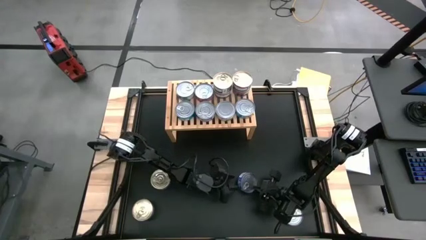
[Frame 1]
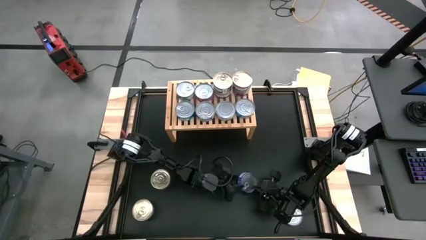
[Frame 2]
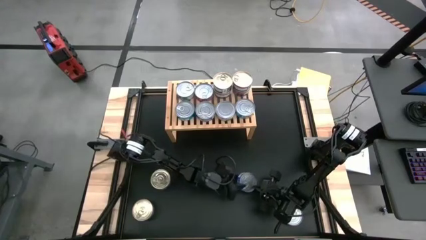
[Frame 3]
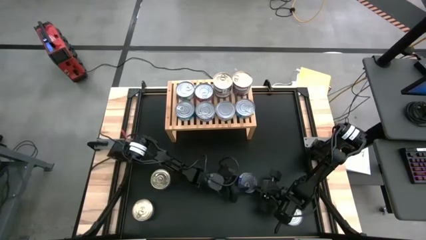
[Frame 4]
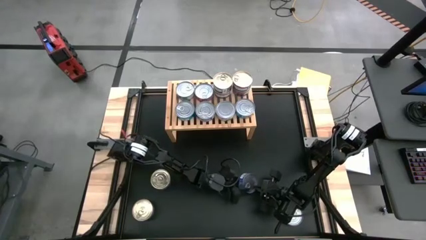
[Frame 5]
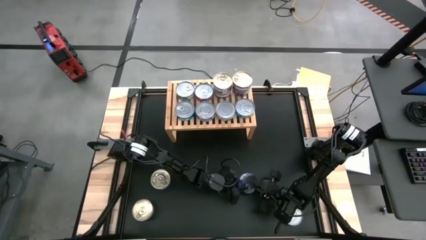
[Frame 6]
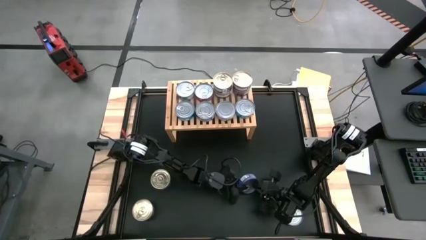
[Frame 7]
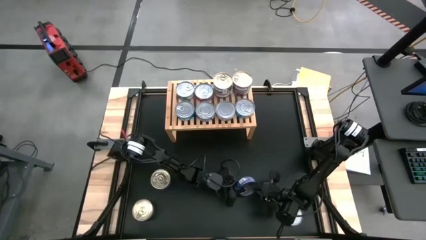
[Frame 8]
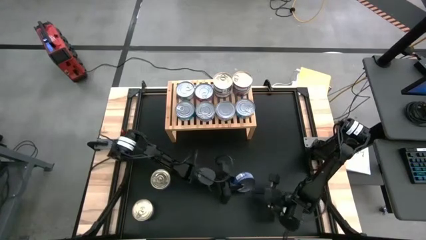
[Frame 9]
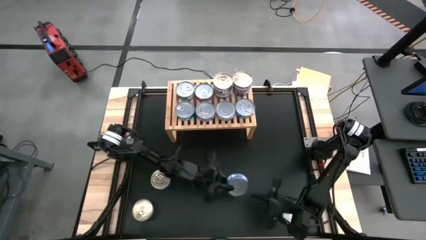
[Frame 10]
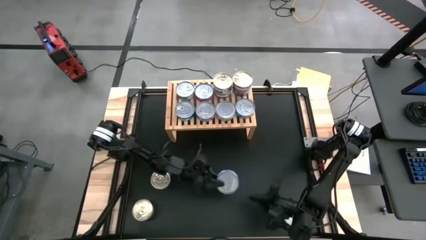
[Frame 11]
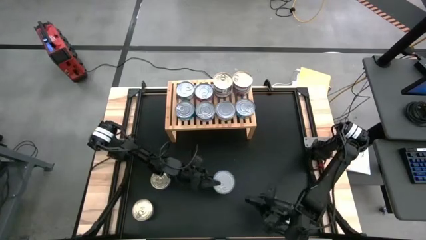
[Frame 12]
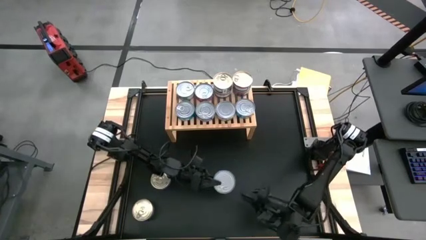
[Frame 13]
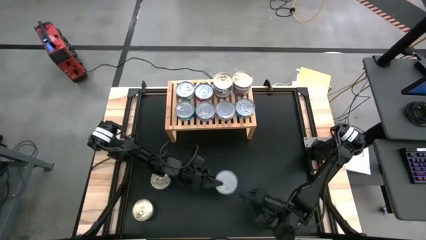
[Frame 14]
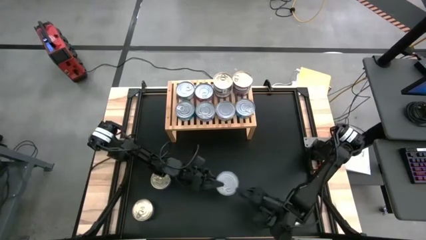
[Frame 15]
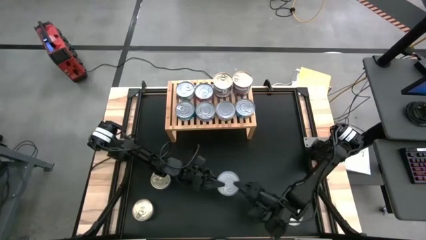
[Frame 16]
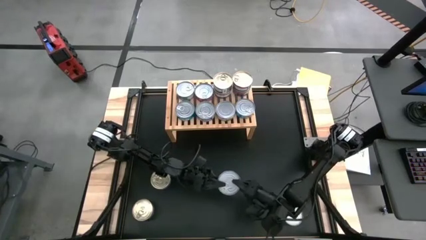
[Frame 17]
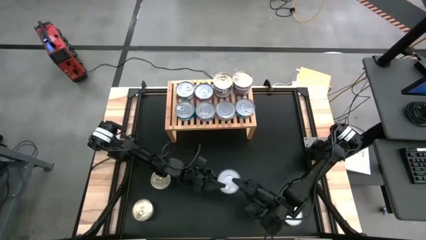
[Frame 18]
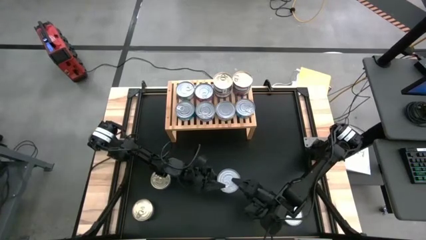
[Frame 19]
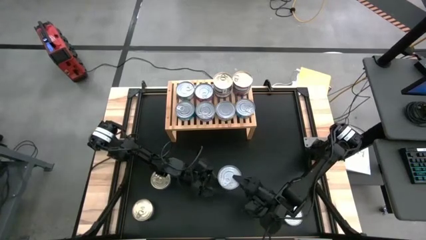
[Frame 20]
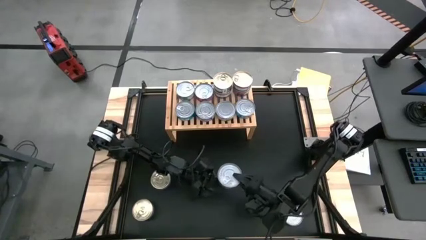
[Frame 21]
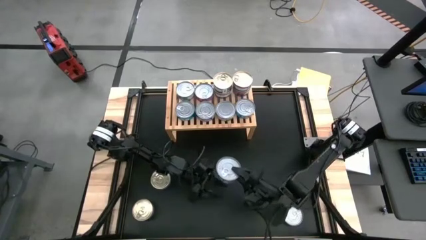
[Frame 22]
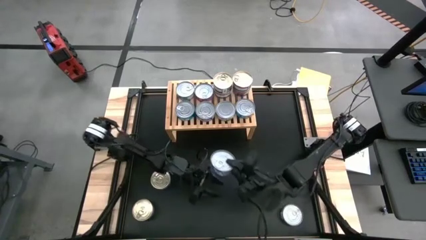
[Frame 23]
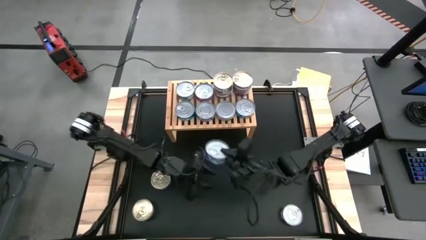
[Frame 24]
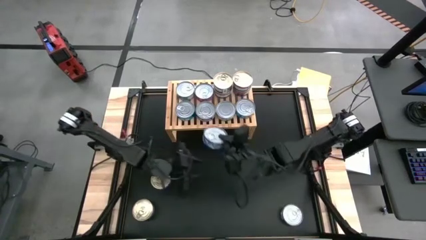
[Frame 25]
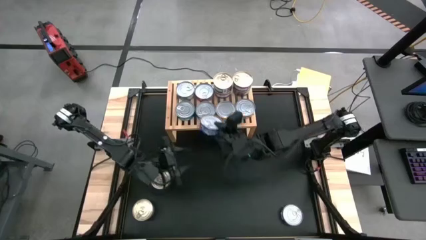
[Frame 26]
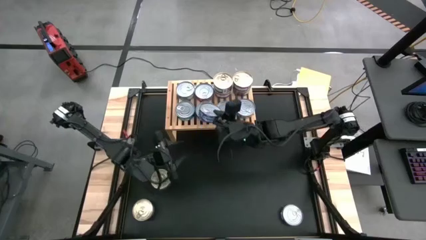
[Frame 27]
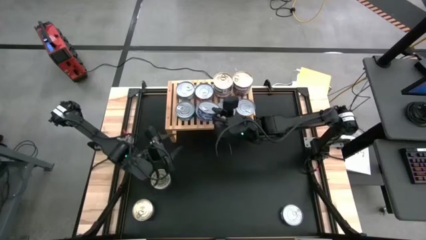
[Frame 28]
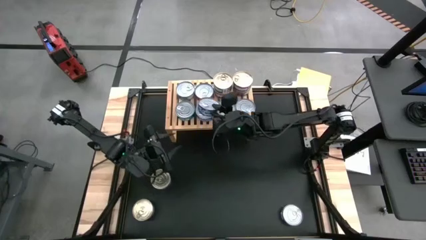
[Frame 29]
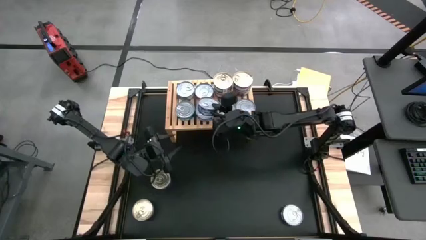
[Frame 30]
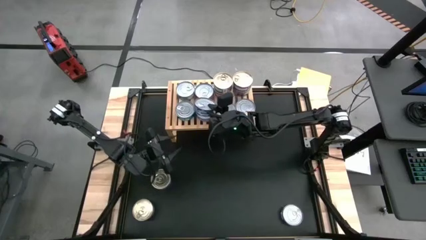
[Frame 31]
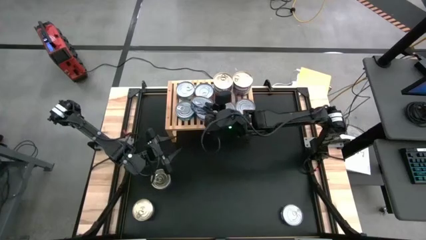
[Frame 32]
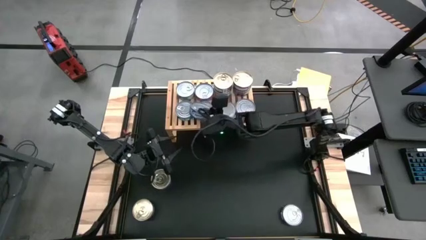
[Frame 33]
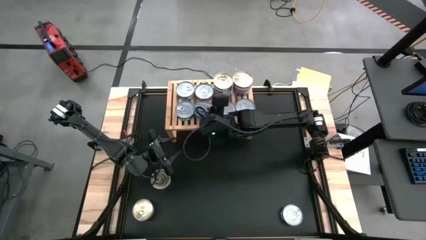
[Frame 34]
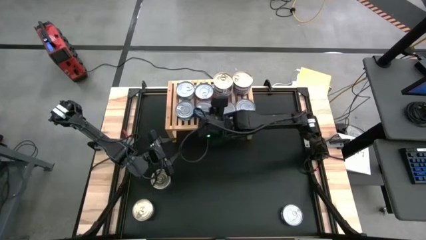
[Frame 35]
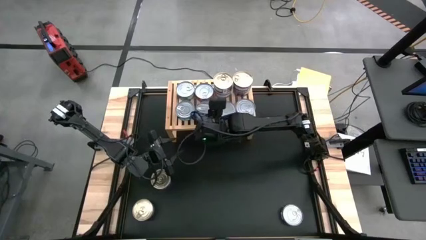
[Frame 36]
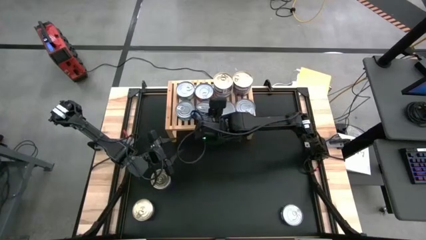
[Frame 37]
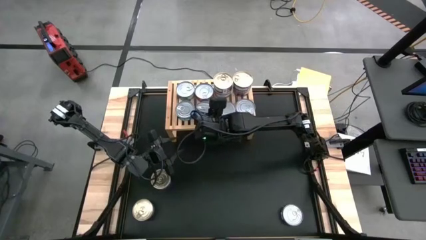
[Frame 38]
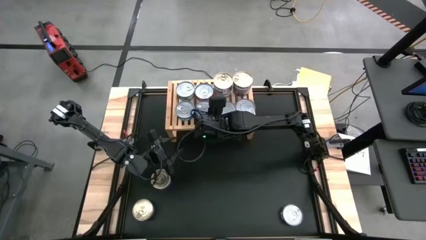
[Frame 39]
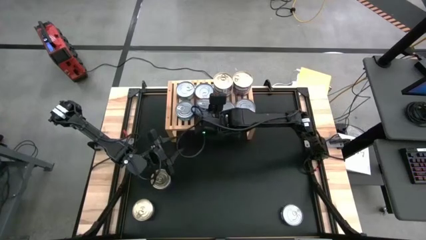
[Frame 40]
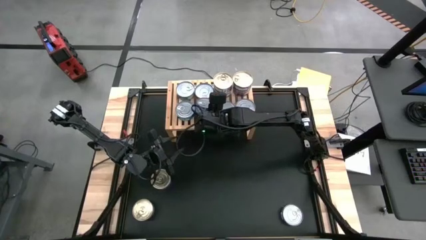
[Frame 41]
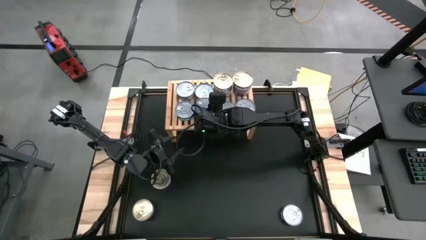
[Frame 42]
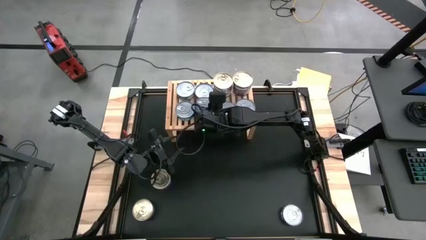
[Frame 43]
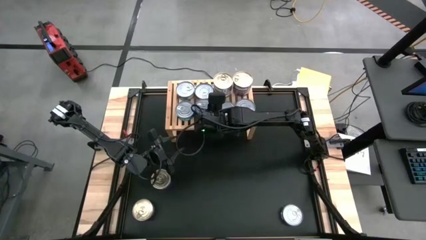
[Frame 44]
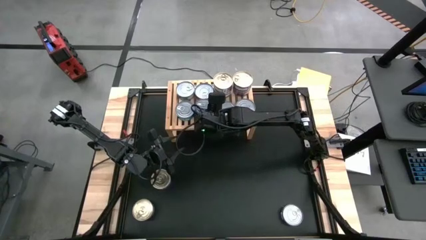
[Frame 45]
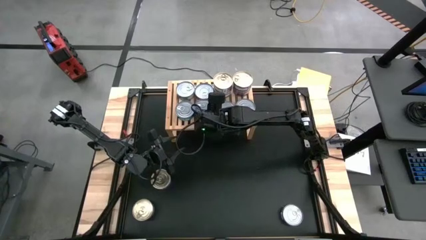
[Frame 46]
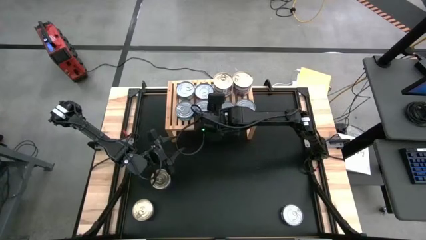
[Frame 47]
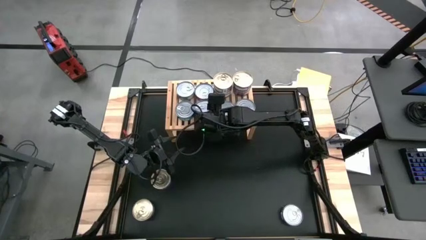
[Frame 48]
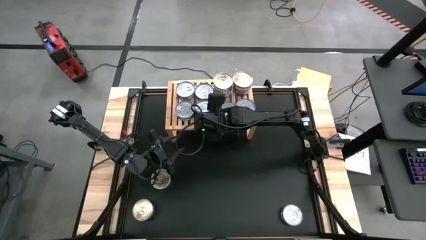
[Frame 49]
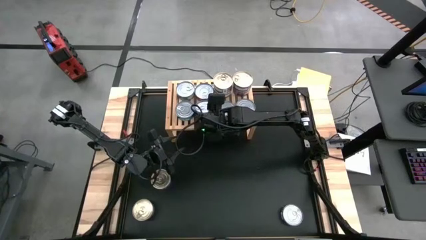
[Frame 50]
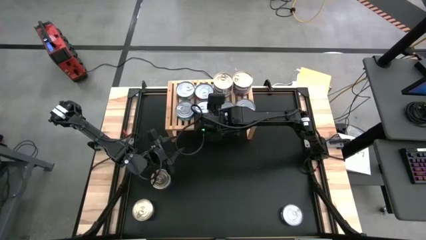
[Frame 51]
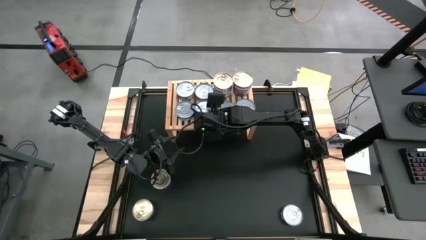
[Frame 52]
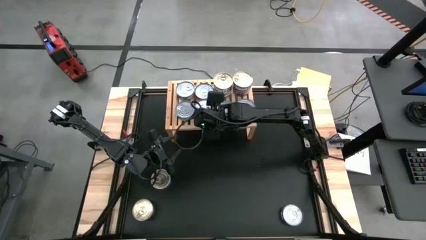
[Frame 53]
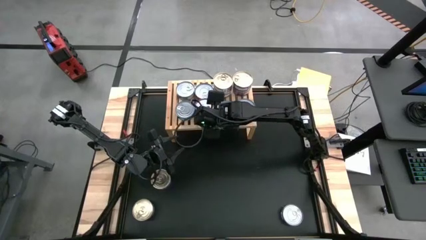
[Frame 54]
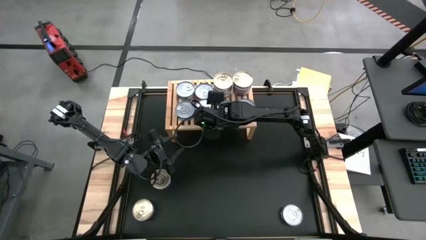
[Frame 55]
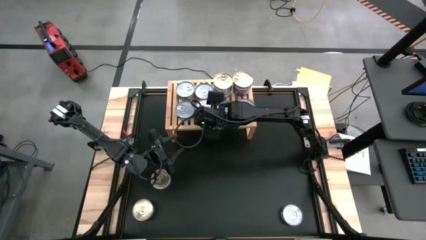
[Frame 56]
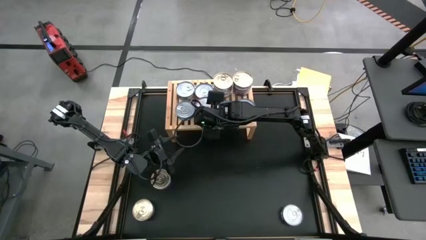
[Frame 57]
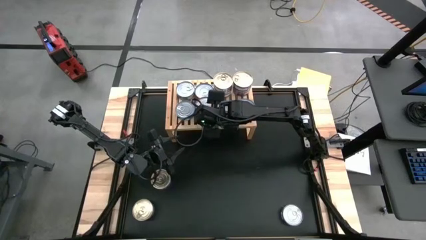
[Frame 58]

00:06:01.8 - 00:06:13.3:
Task: Stack canned seafood by type on shelf
Stack the blue tuna can on top of the blue tuna can

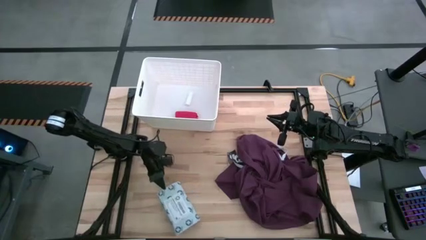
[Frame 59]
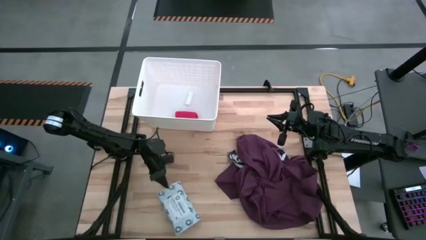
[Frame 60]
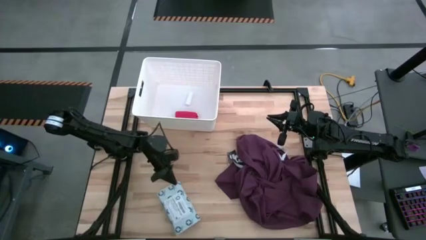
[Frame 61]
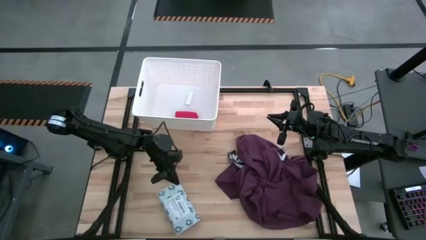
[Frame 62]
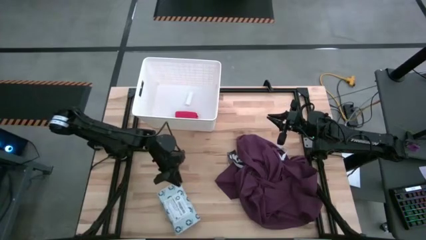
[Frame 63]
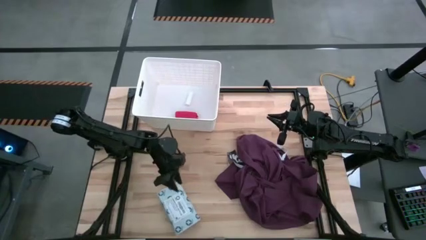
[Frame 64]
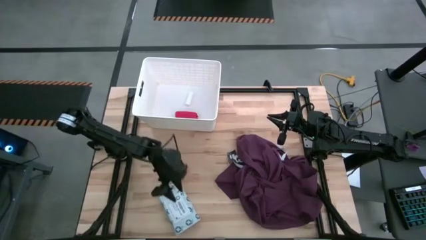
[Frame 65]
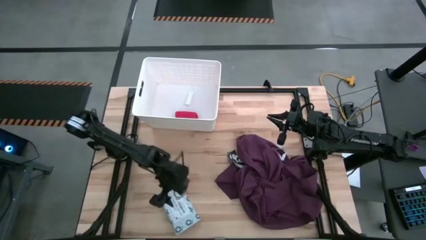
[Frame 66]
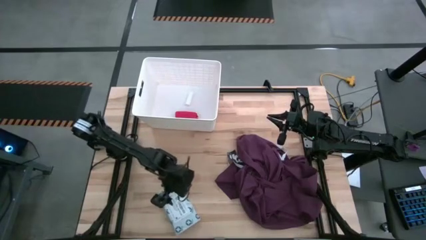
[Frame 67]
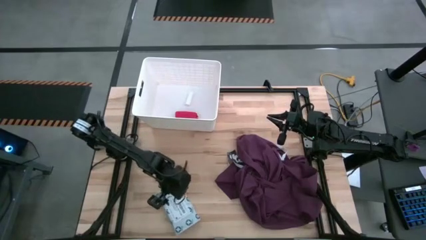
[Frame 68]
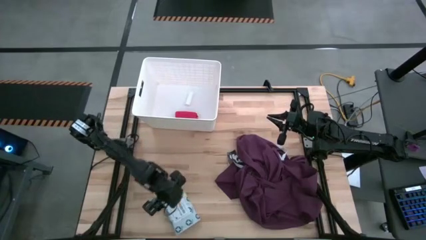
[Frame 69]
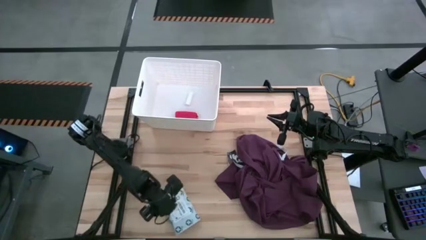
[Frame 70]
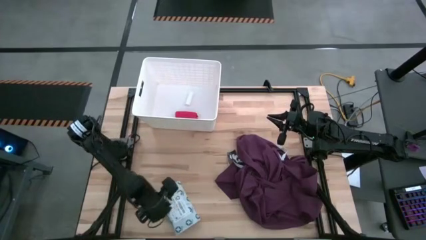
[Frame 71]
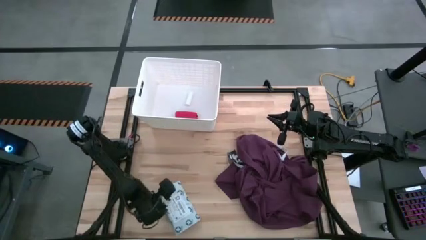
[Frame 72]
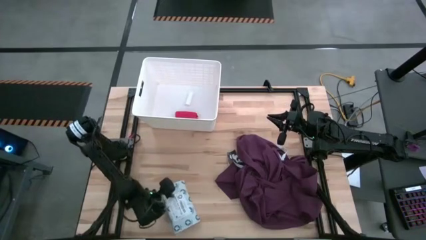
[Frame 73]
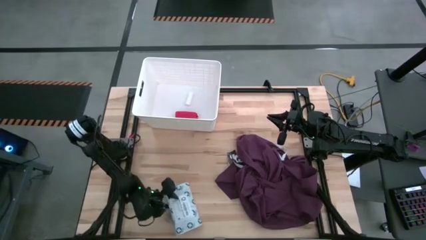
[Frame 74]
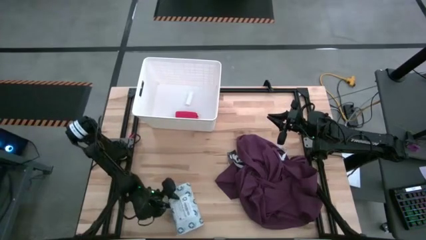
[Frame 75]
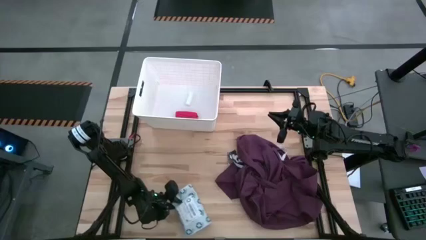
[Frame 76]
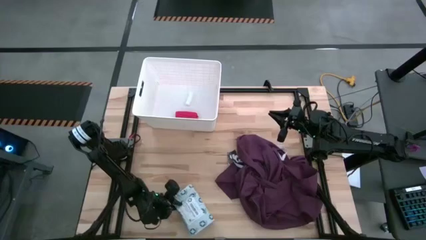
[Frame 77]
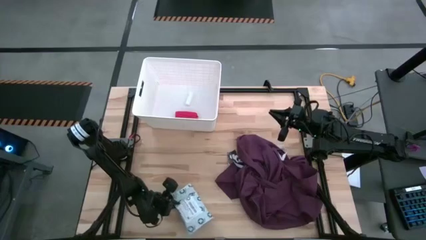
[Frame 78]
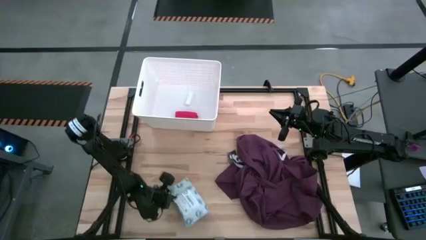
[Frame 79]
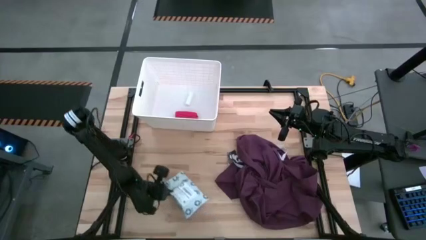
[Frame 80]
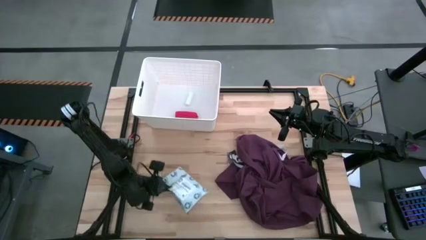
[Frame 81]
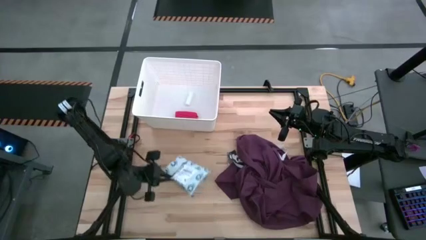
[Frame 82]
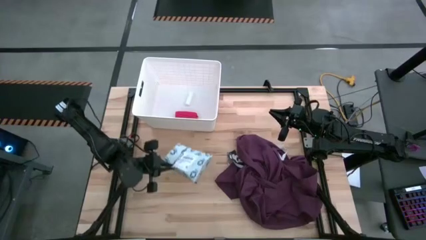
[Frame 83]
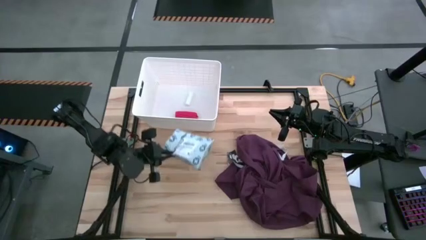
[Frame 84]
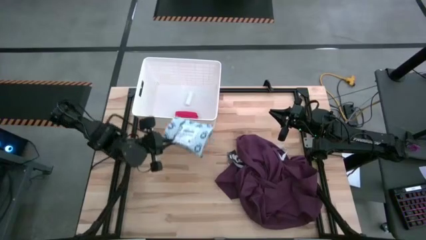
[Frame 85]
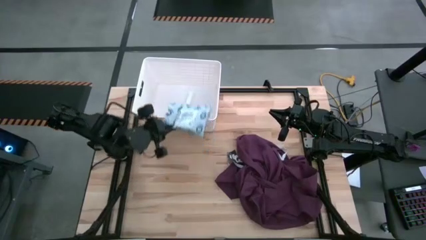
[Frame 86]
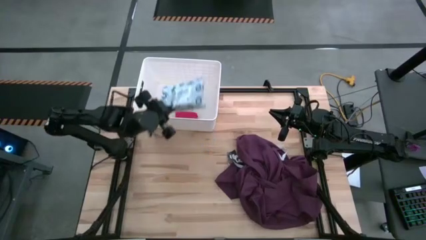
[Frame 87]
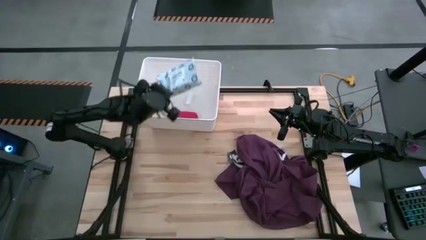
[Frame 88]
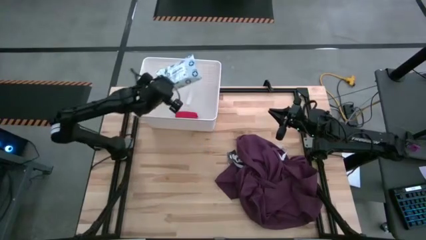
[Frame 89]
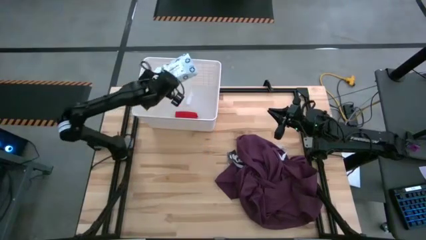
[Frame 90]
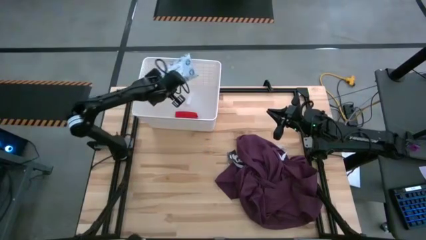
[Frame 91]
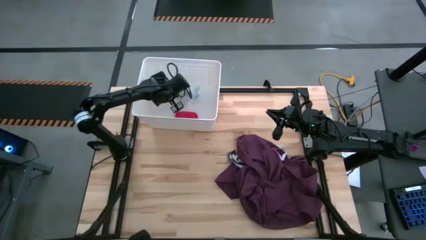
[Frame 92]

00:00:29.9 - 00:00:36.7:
Task: Pick & place medical supplies in basket/bin
Put the mailer bag into the white bin
